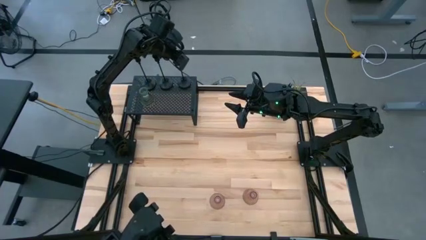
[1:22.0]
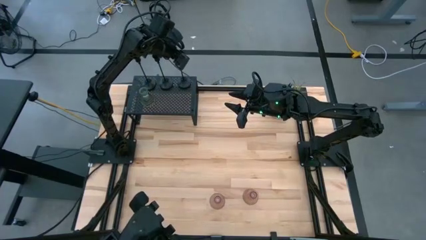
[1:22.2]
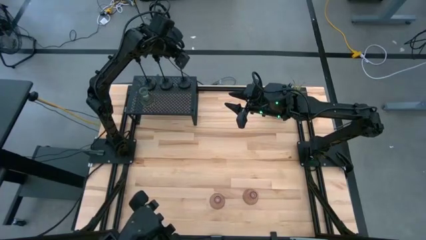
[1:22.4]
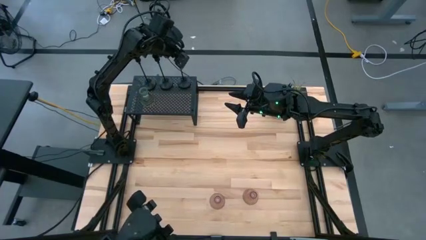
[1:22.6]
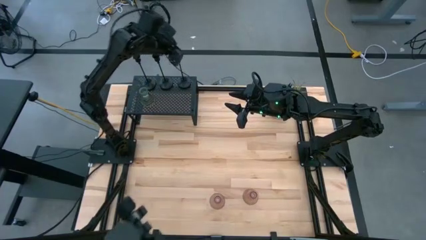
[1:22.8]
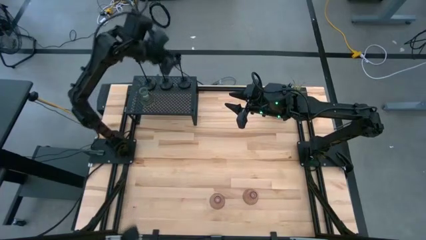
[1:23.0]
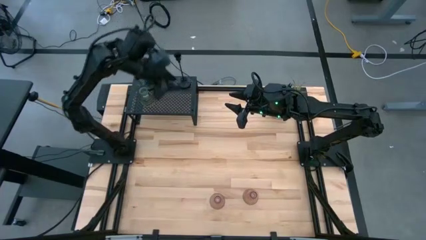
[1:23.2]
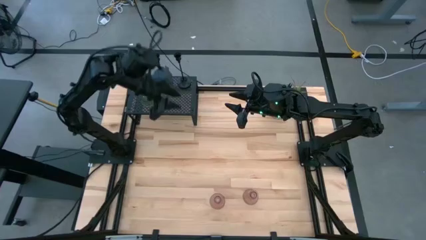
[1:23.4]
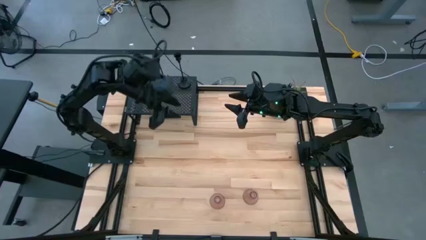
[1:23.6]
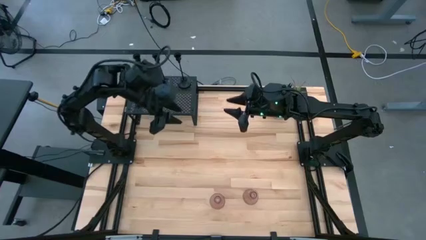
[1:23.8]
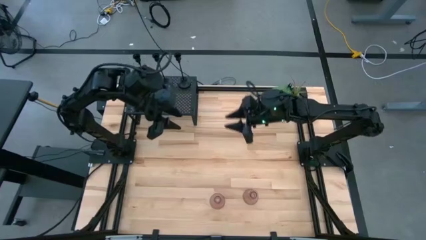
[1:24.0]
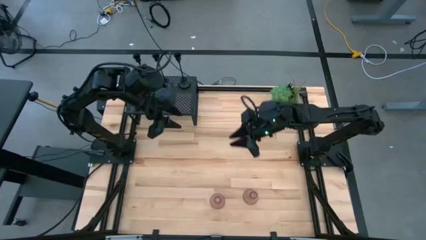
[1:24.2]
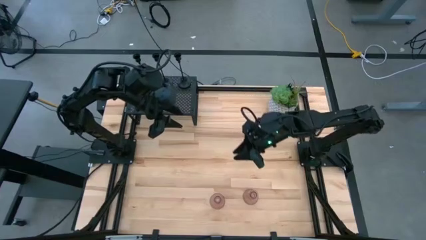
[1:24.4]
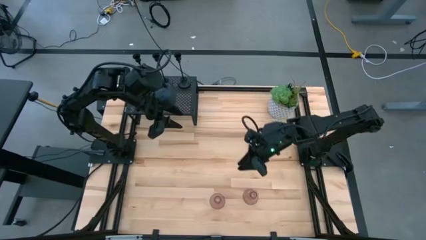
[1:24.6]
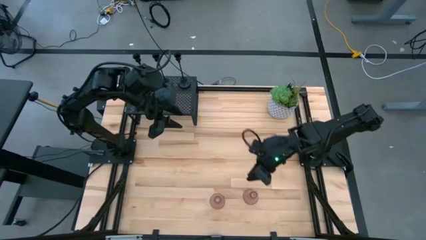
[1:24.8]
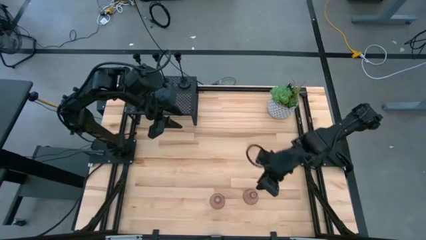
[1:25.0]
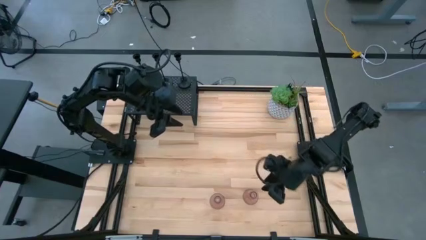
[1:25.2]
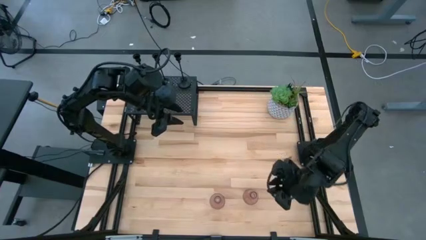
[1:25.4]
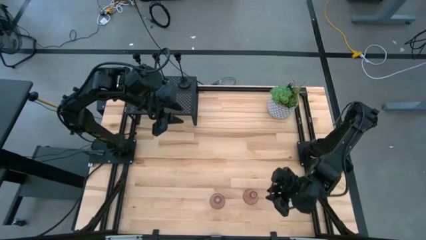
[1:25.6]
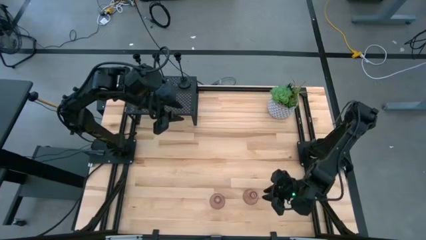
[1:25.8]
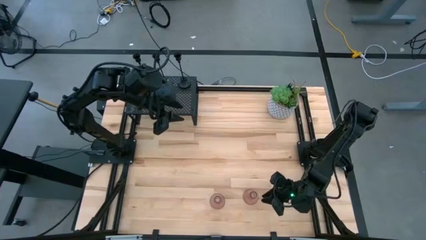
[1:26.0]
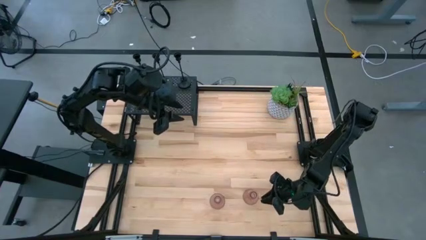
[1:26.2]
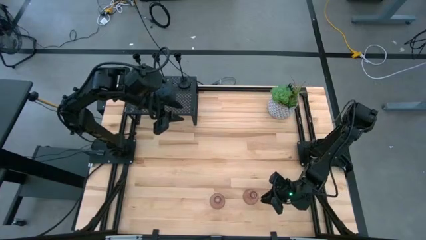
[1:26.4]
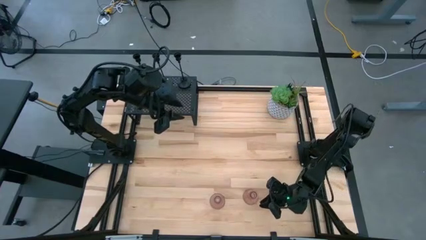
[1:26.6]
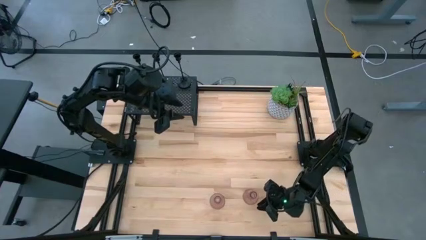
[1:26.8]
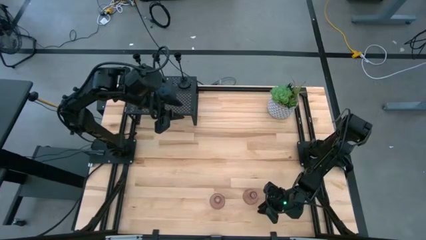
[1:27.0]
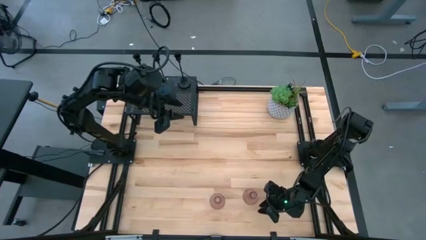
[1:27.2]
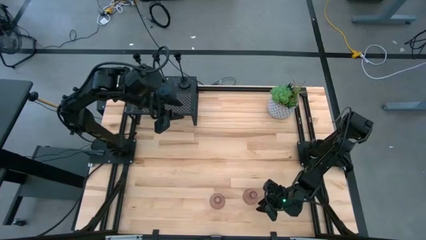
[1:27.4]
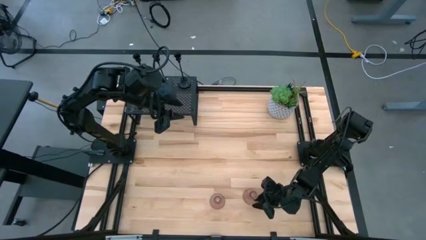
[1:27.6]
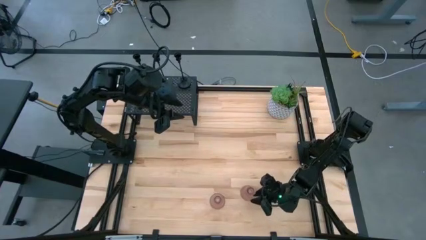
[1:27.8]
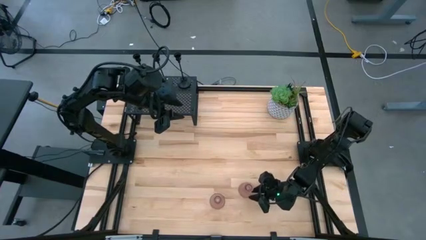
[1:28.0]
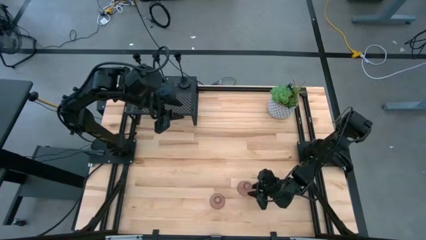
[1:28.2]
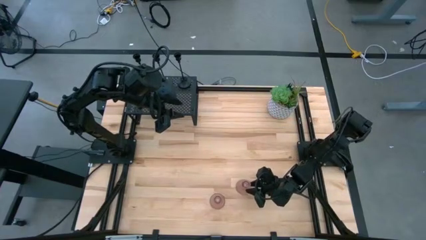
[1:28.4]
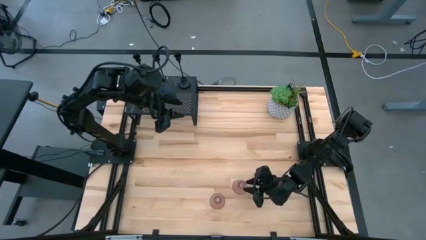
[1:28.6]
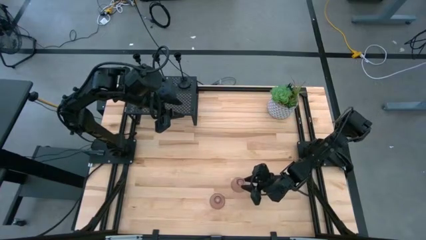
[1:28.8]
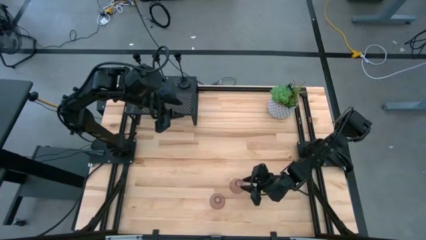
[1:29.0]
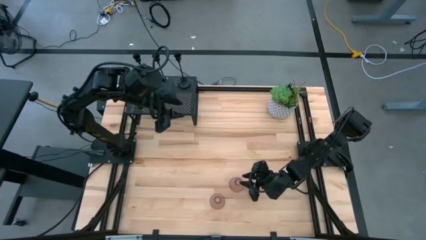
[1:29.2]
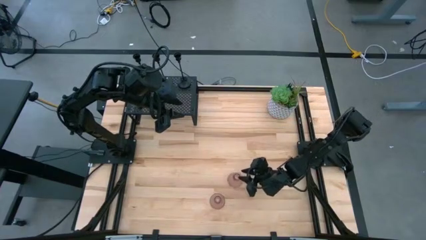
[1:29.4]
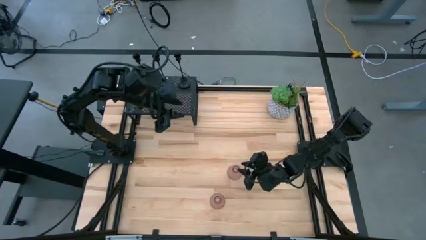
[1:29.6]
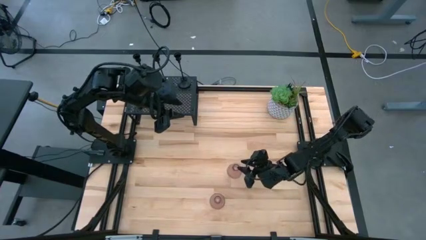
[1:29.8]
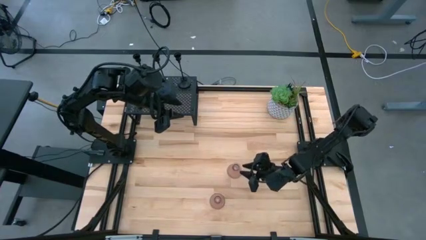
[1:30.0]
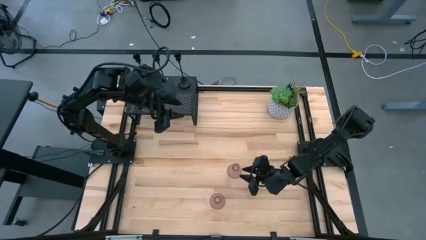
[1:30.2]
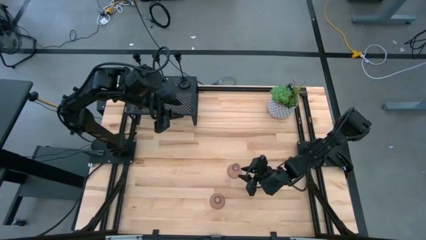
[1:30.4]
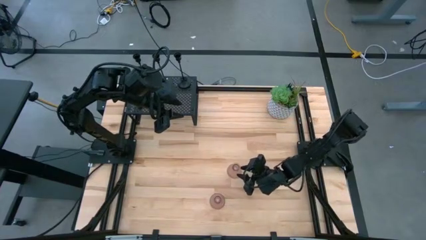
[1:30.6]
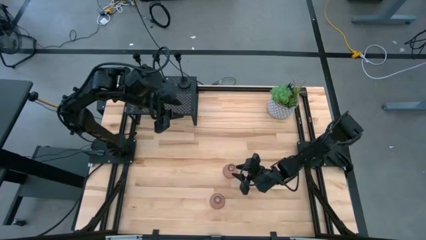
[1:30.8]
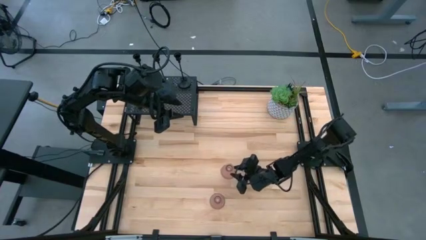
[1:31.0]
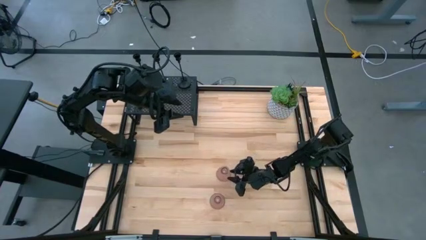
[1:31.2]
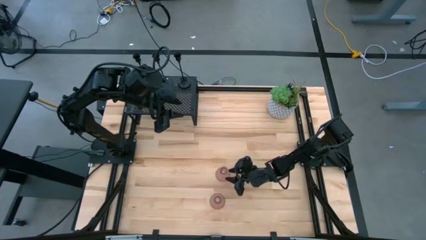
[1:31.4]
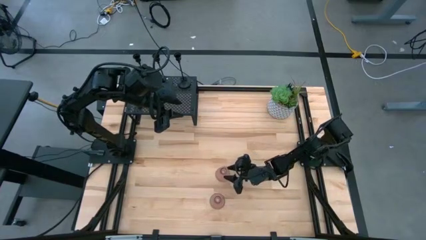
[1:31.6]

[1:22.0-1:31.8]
Task: Pick & Place candle stick holders
Put the right pink glass candle holder on the shelf

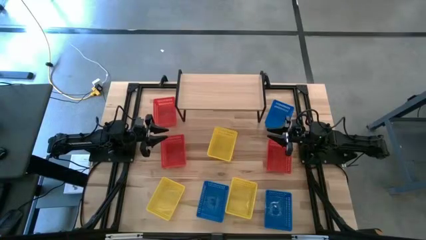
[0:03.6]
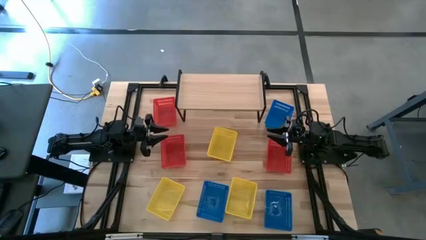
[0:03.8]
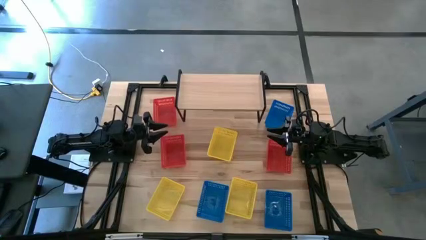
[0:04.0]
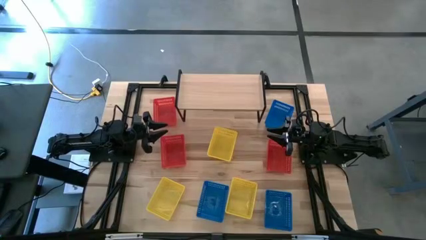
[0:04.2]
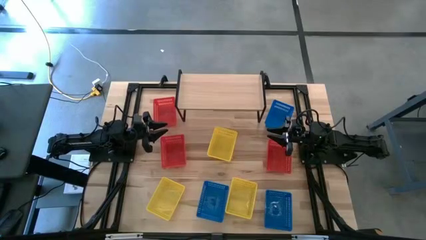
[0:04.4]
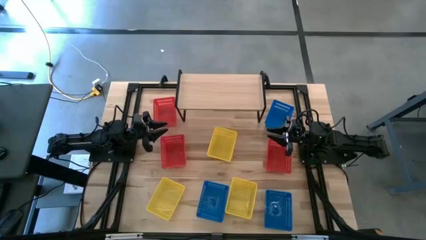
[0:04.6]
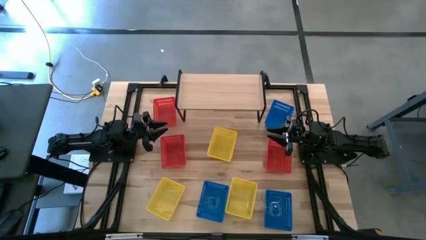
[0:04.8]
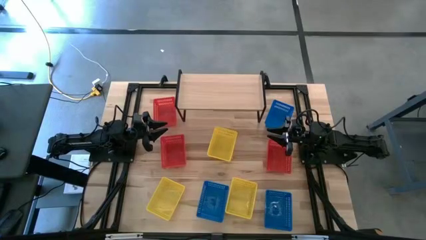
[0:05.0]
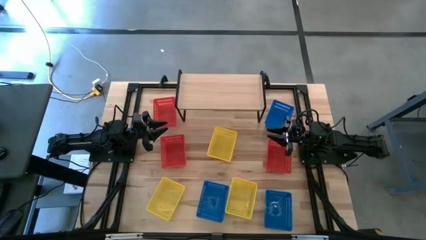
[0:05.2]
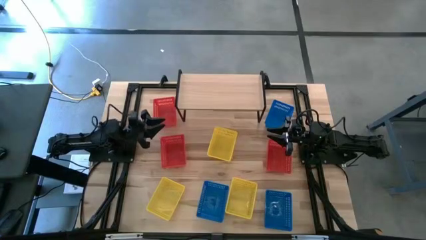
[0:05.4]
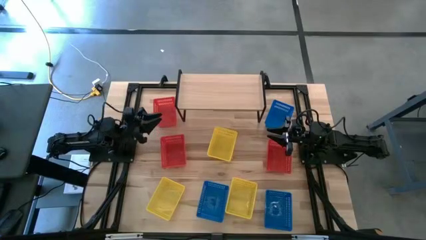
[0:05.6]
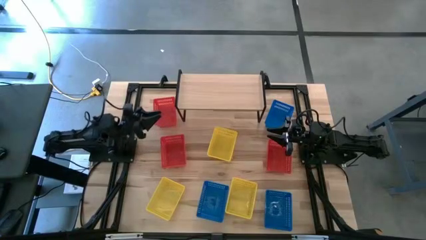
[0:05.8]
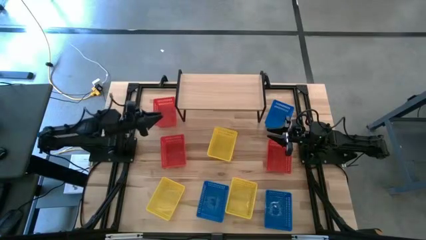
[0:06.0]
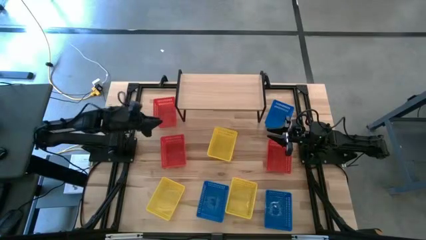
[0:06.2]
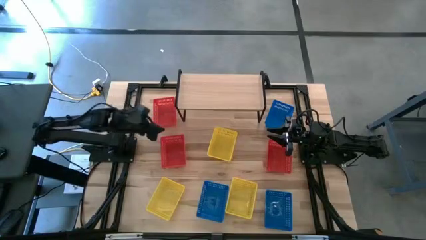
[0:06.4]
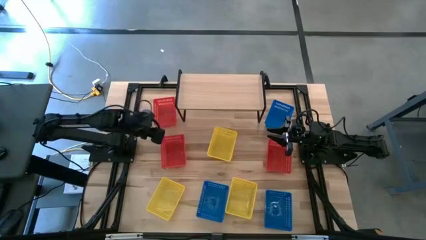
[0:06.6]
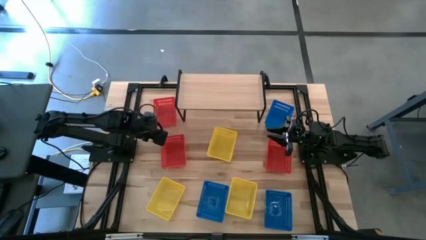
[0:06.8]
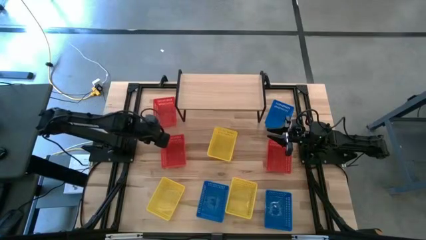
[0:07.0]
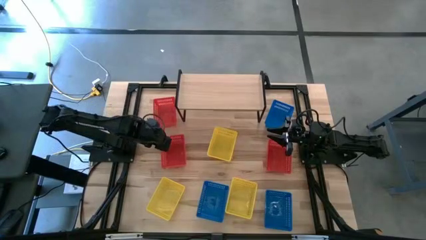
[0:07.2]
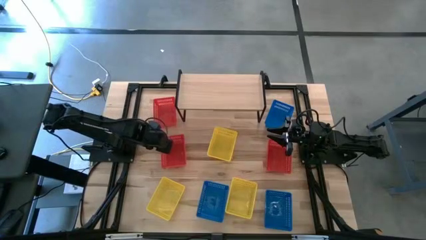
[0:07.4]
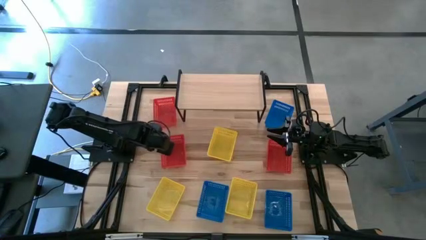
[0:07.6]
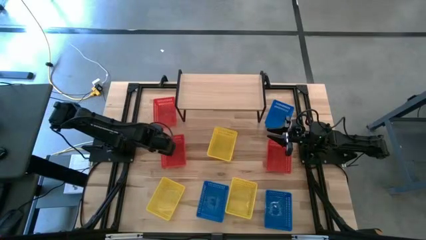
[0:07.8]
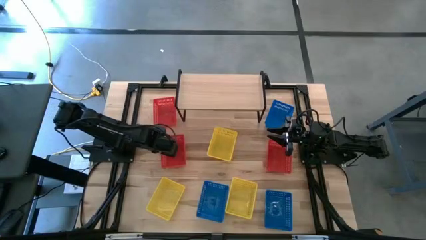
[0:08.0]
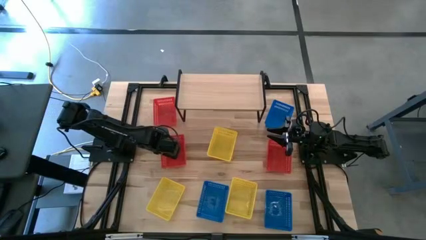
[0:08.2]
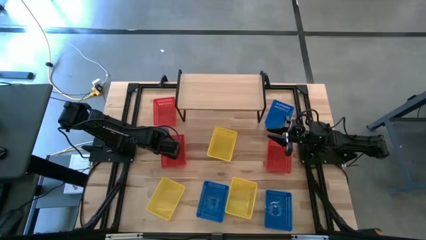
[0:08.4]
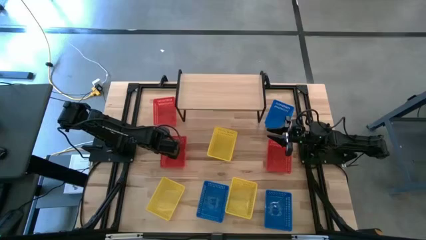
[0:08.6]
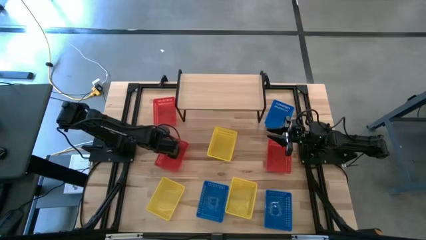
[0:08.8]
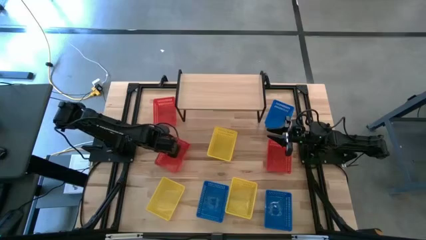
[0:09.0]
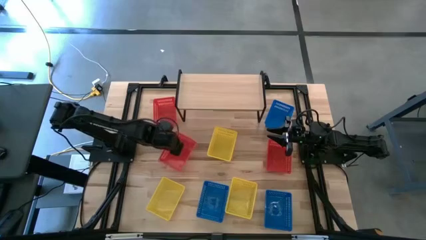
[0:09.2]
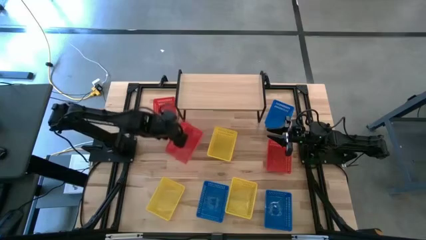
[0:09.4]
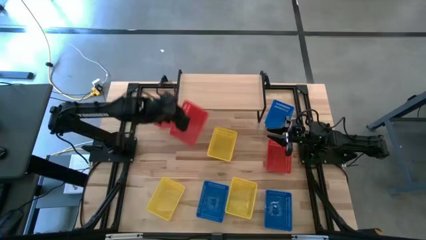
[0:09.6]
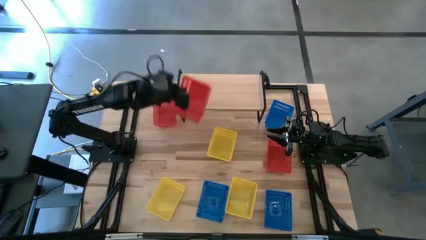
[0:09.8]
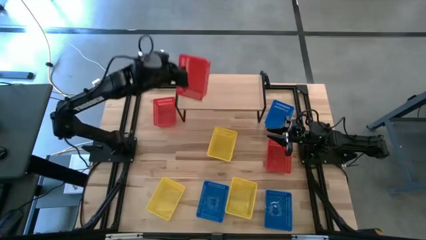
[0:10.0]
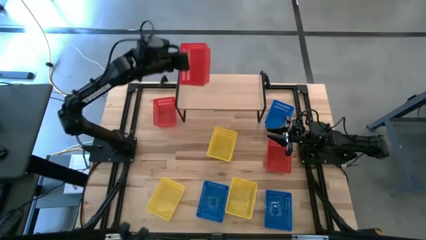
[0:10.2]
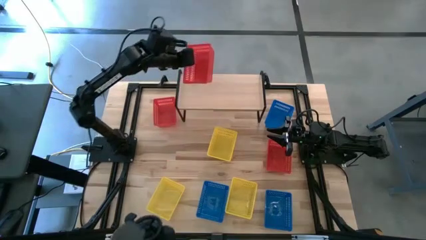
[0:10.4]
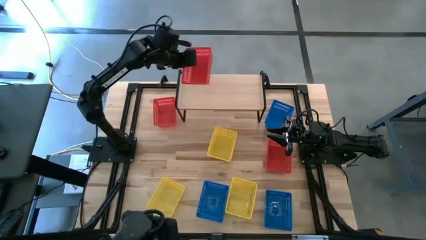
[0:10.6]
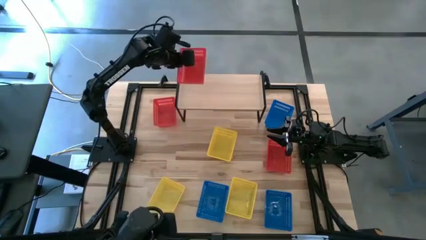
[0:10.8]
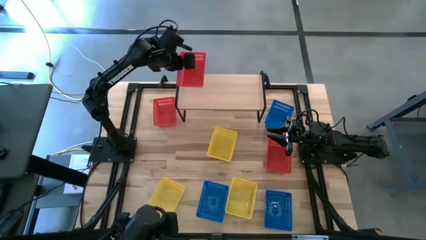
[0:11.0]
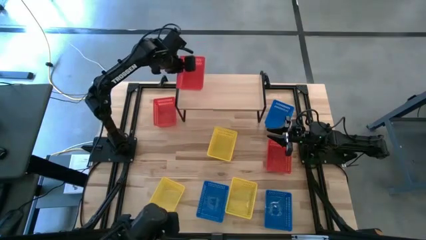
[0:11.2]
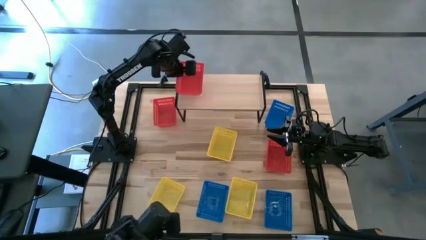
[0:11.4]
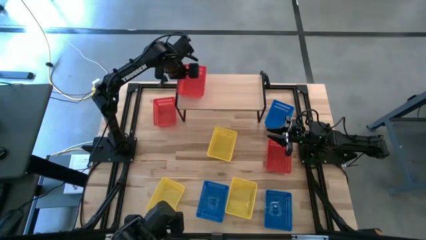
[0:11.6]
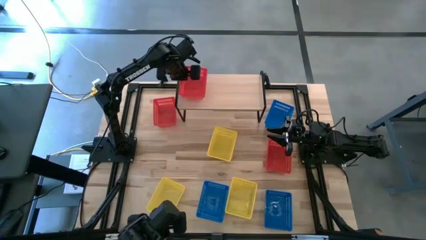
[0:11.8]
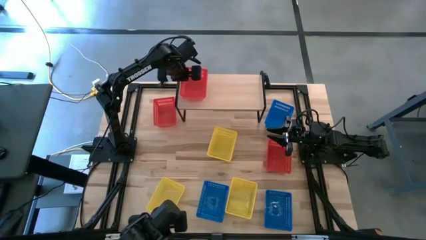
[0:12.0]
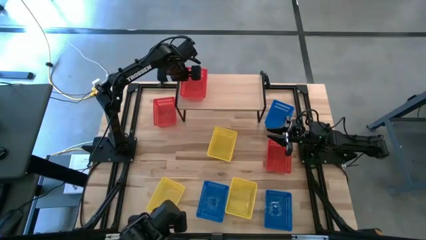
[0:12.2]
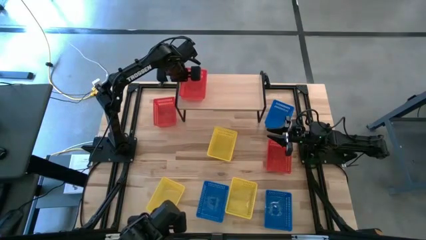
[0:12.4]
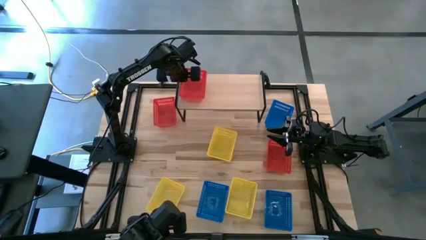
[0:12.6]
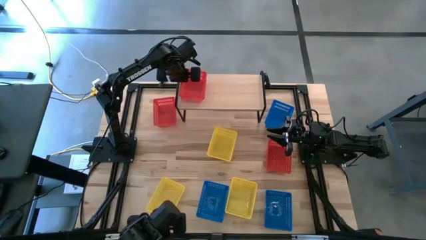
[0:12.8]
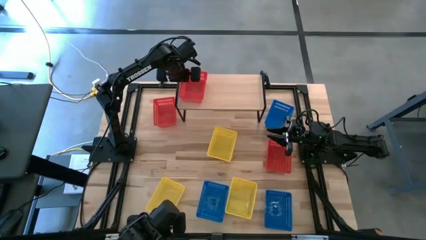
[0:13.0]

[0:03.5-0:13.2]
Task: Stack baskets on shelf by color
Put the bottom left red bin on the shelf
